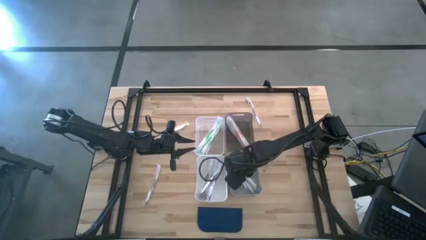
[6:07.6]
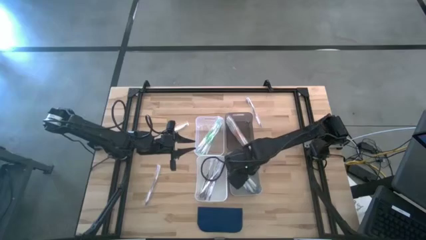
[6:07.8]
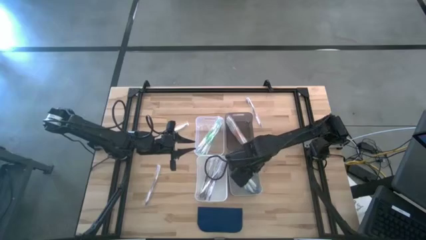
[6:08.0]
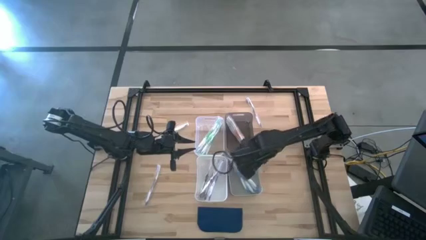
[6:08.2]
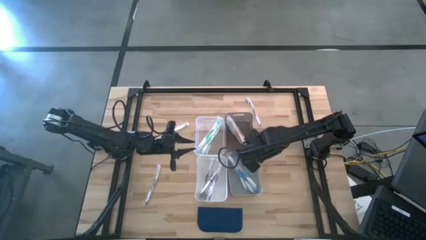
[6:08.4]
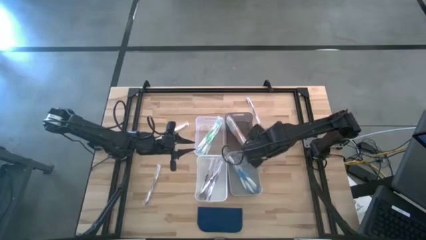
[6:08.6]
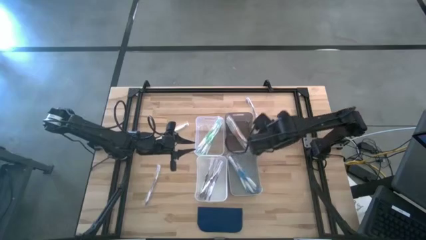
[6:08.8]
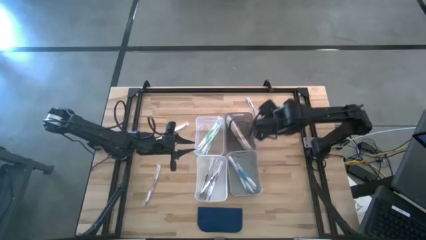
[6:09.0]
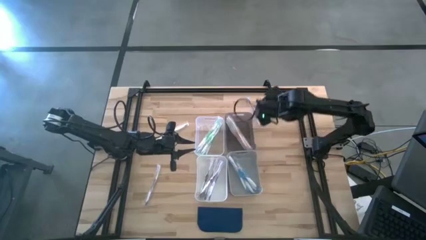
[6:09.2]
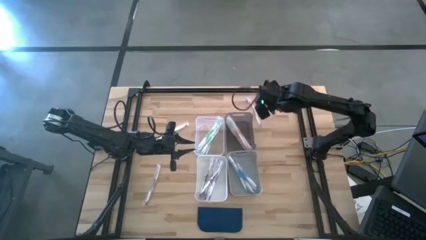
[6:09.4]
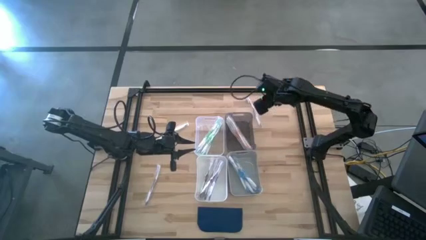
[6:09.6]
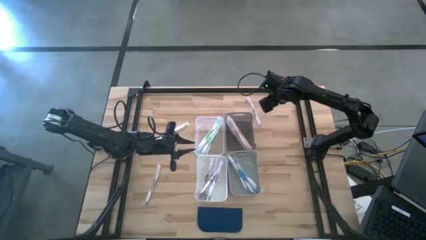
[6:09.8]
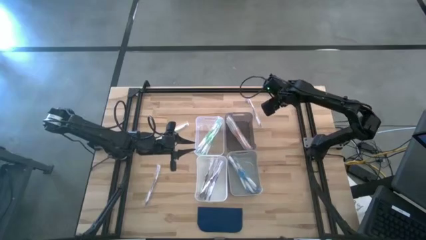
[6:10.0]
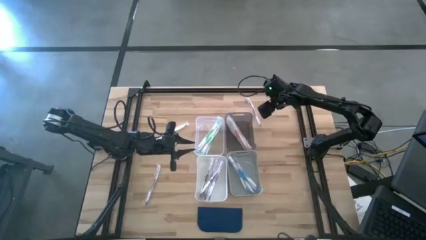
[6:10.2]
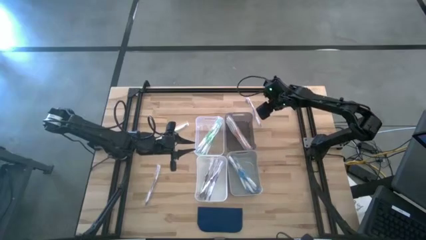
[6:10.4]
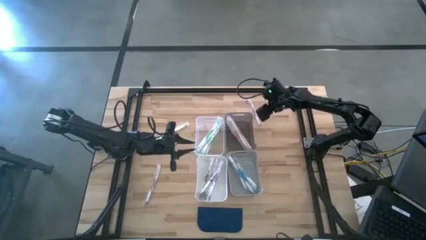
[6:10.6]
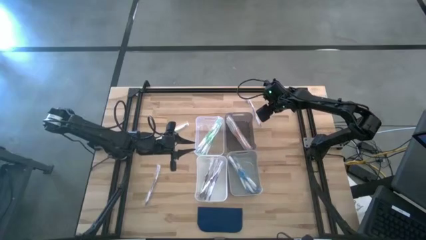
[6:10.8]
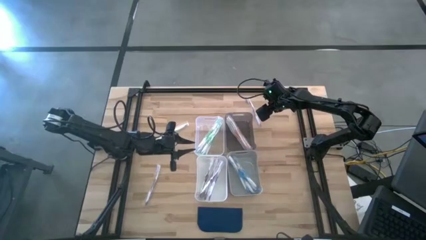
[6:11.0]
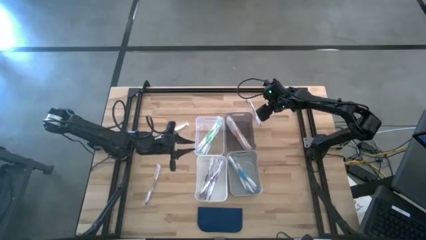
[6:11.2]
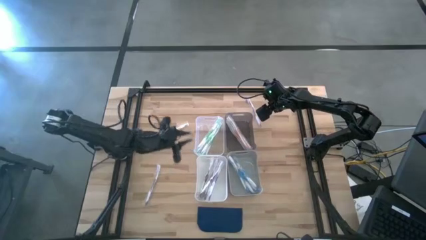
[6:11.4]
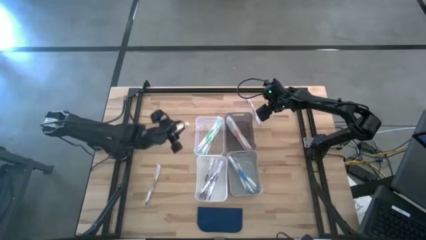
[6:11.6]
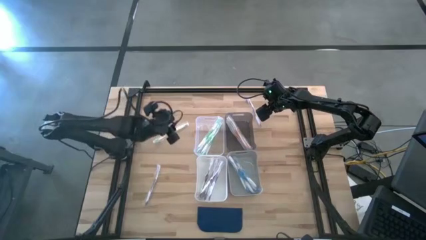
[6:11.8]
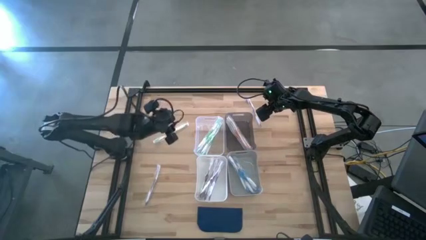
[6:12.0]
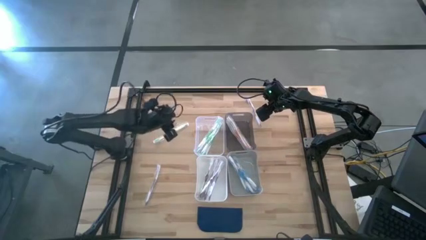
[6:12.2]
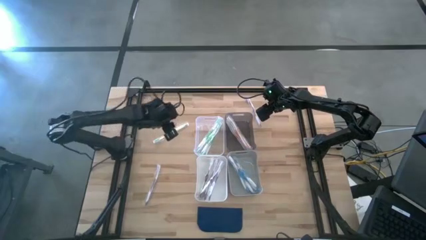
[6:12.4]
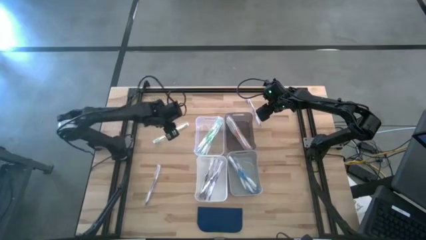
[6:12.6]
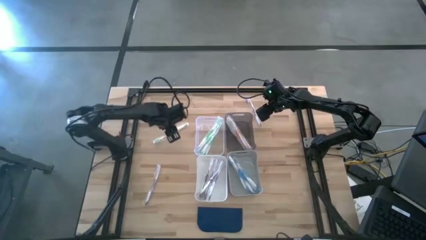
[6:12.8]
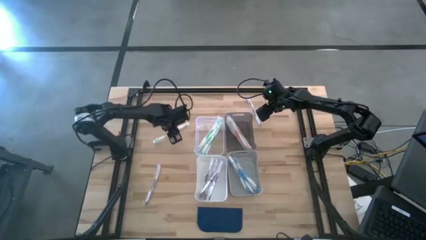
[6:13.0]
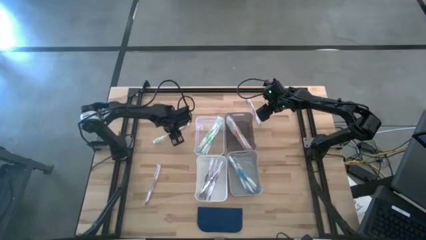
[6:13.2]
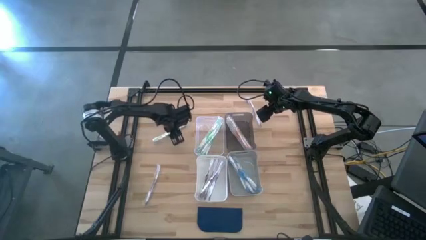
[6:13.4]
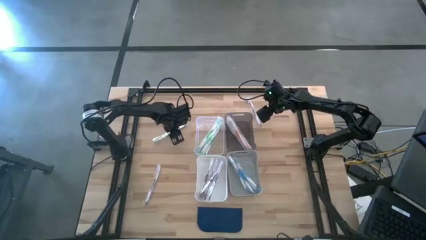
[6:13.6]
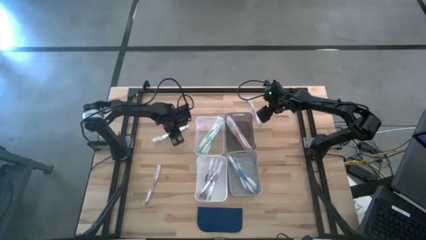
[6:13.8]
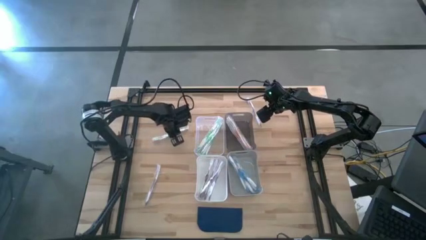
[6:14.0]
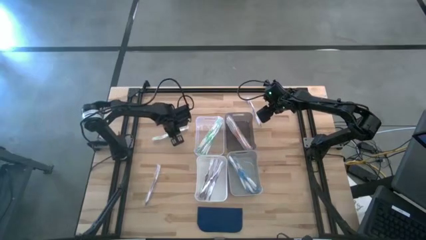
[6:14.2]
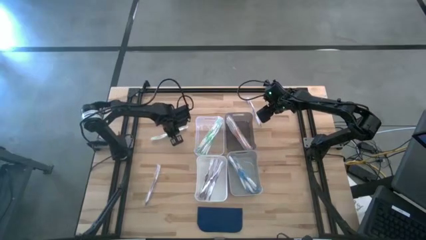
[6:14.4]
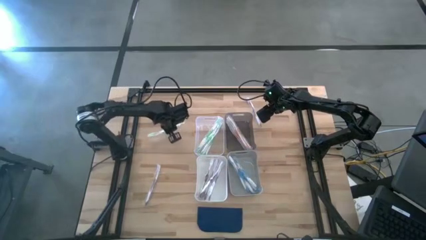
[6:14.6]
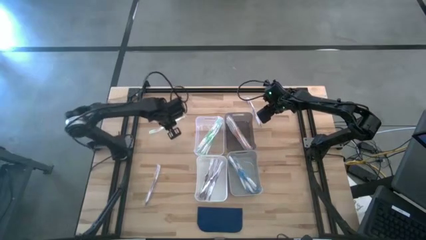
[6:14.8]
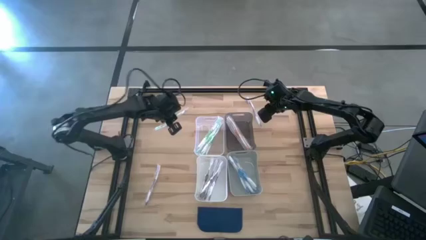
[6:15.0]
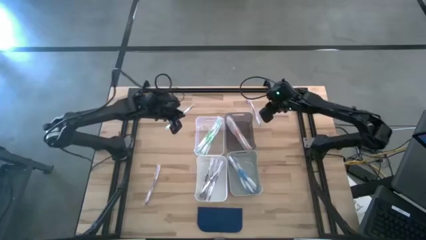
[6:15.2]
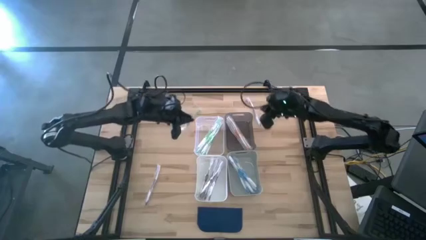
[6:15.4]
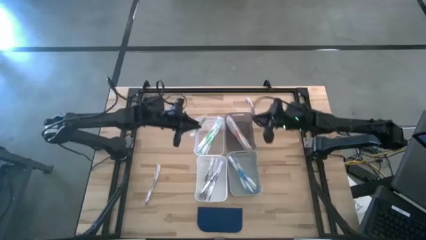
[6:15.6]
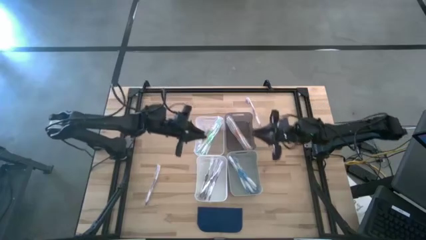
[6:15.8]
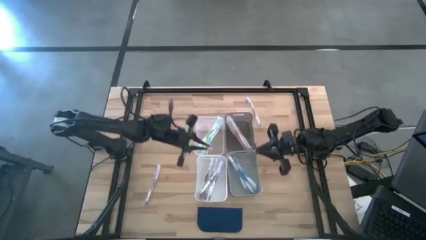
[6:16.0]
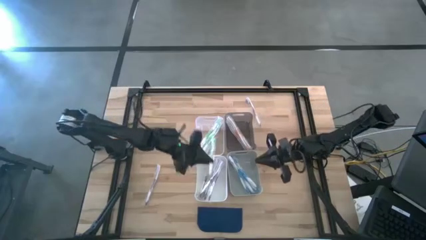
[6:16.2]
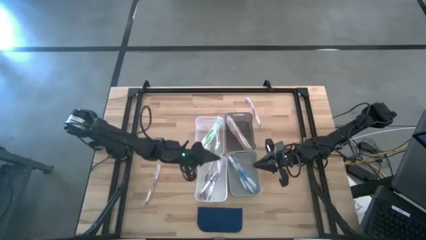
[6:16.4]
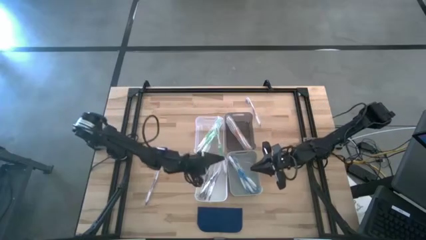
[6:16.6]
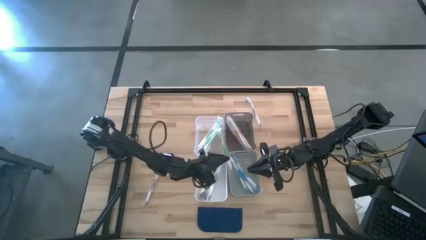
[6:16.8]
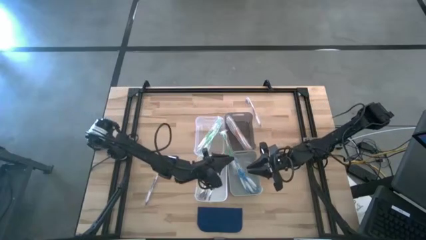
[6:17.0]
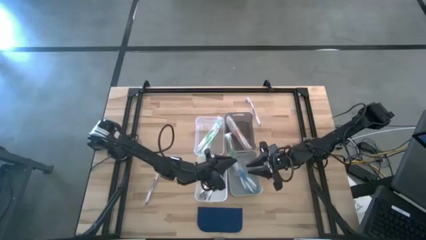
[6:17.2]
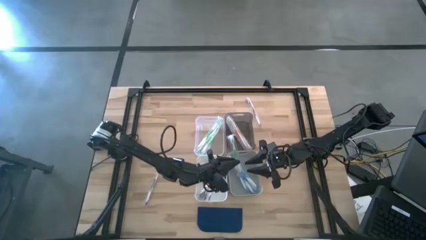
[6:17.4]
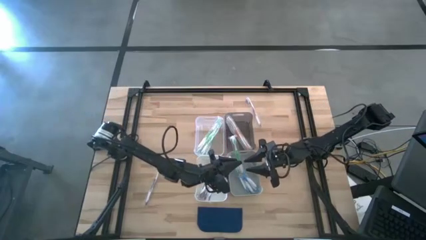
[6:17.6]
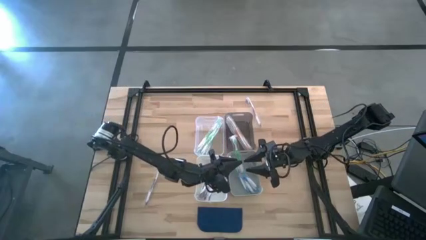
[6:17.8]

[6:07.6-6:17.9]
Task: Pick & Place Toothbrushes
Put the green toothbrush into the transparent bin

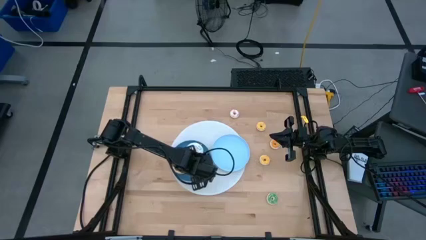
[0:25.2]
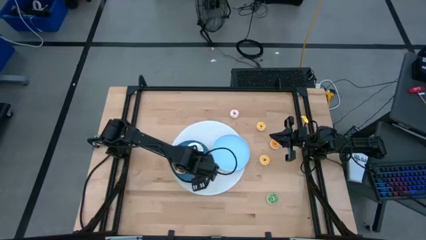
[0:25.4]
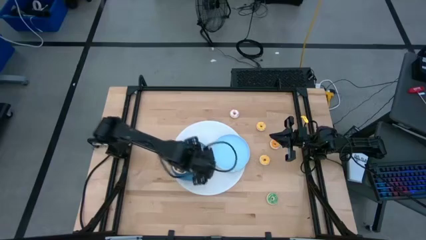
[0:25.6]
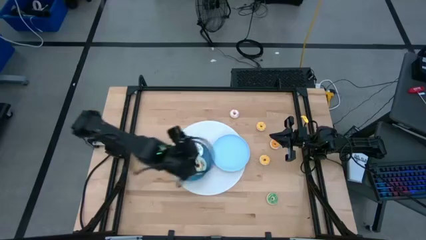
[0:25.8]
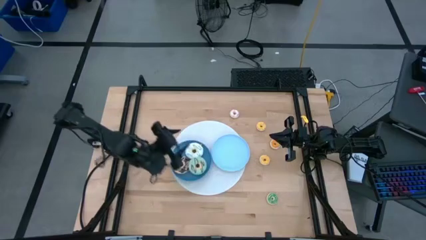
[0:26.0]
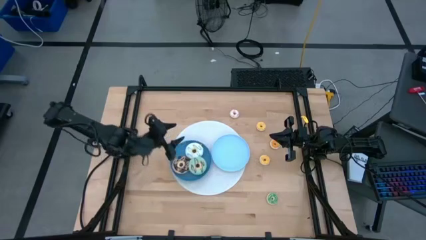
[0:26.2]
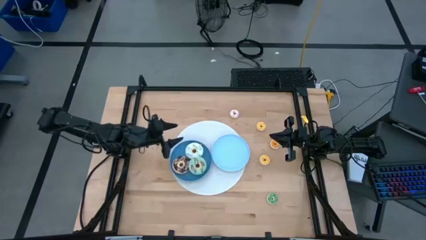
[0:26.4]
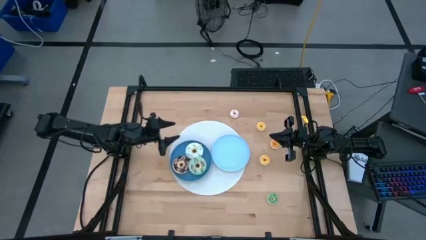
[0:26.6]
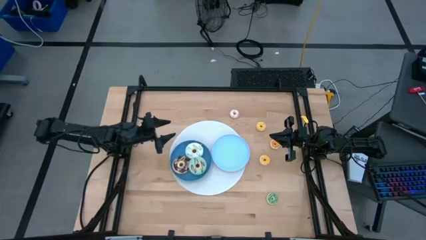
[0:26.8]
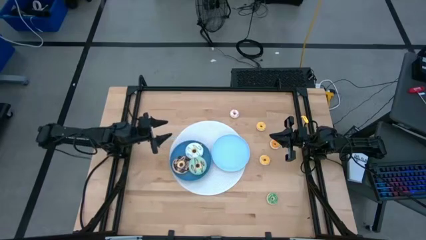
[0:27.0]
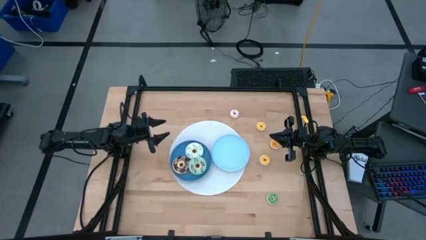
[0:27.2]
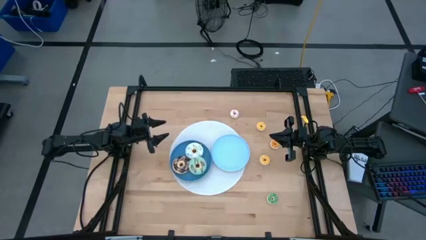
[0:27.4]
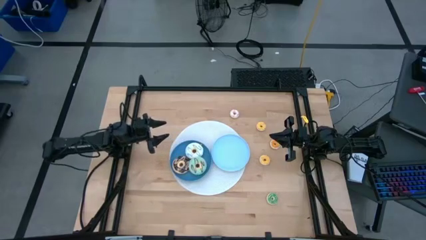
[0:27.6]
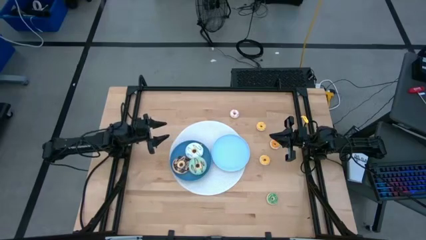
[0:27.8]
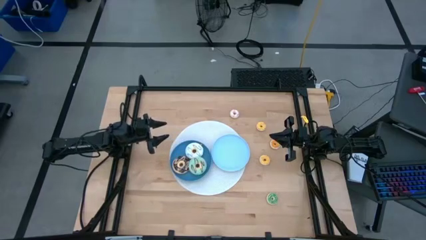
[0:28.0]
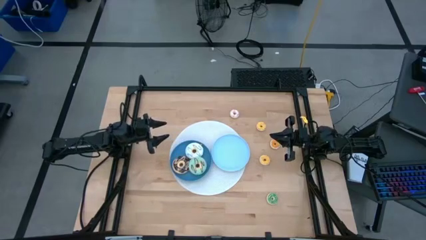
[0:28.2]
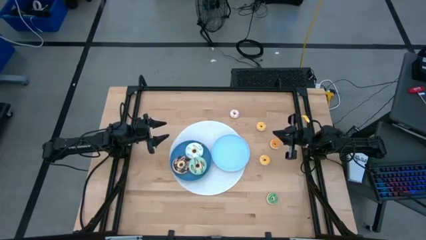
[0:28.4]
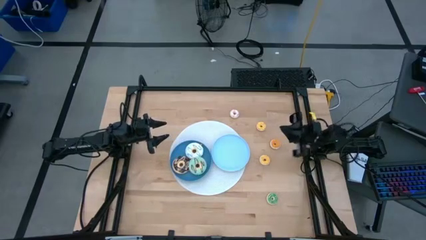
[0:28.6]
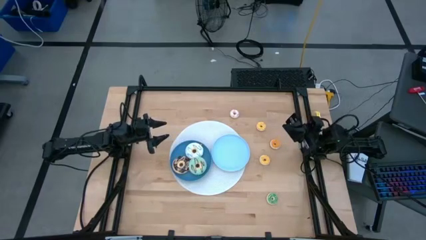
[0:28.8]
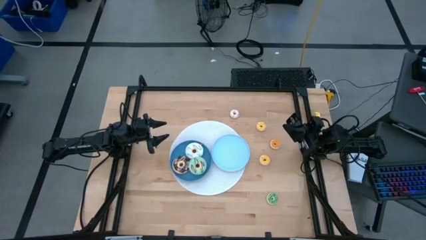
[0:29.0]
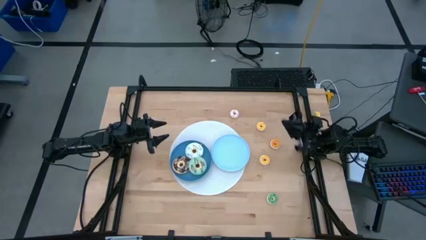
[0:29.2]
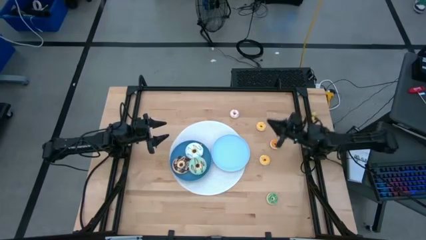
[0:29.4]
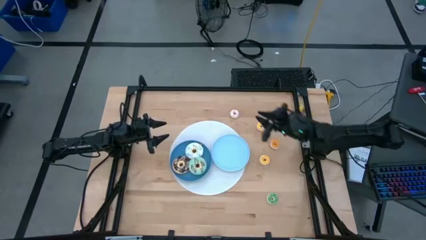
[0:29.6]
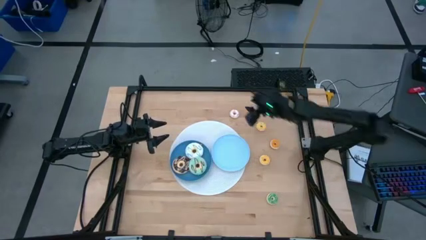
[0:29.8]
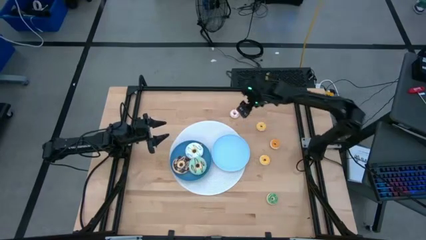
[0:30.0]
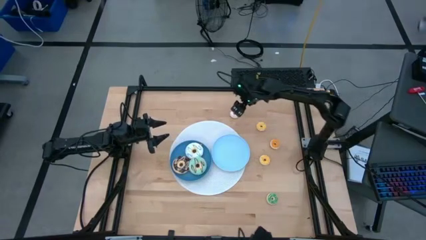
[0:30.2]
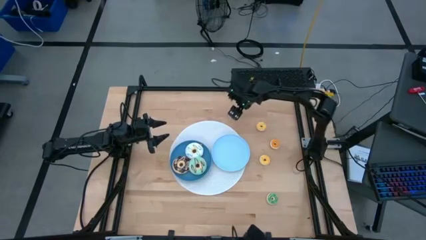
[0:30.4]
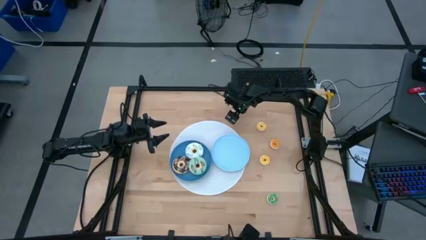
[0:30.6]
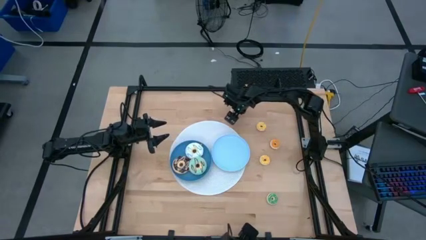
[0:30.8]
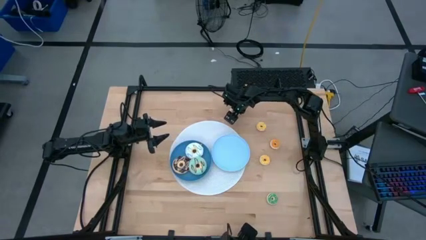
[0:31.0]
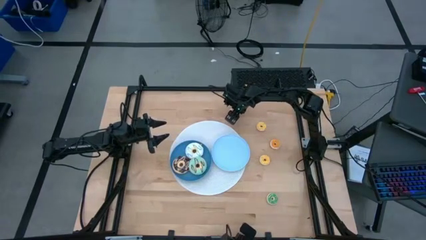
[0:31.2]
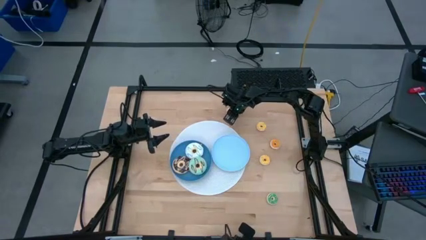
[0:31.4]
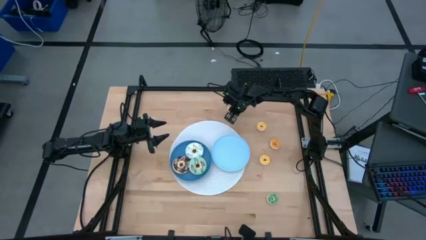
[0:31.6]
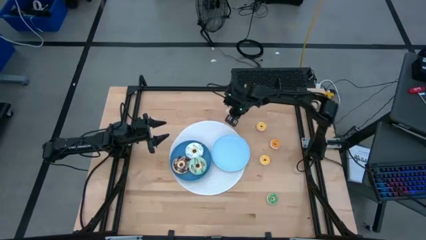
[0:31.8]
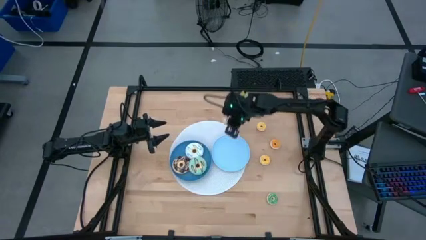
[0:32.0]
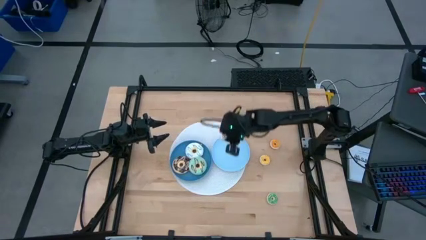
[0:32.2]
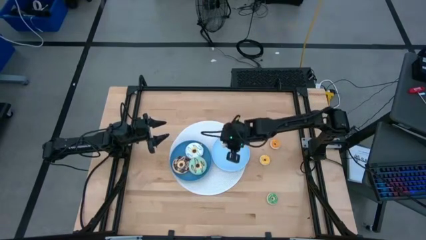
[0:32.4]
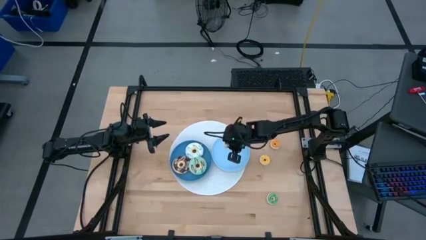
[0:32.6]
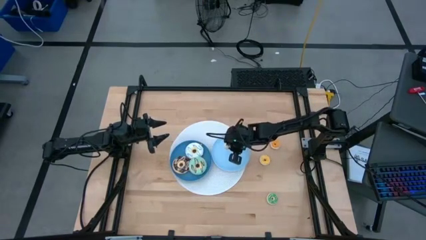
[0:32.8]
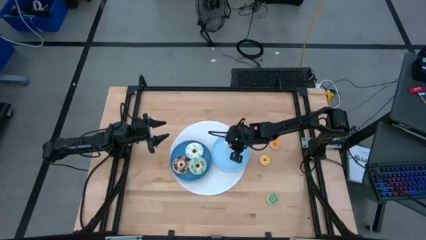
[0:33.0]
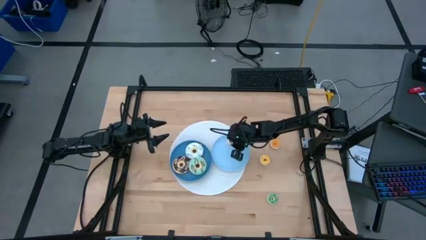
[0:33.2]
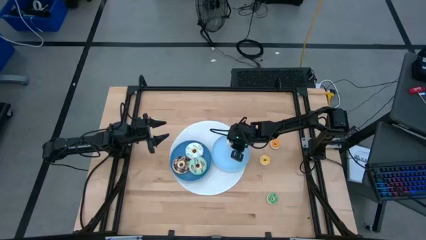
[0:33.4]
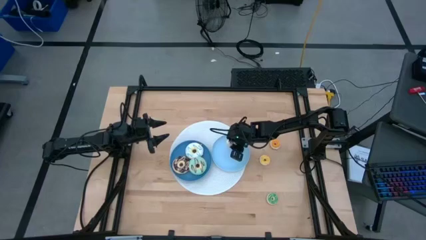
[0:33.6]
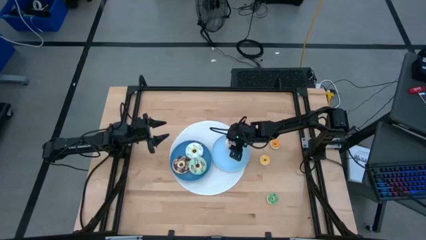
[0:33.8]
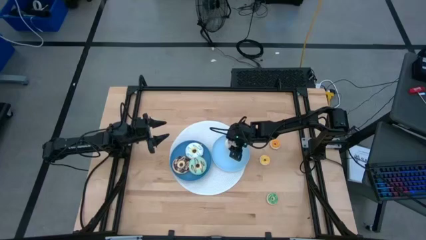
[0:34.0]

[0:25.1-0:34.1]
Task: Pick & Place donuts
Put the small white donut on the light blue plate
